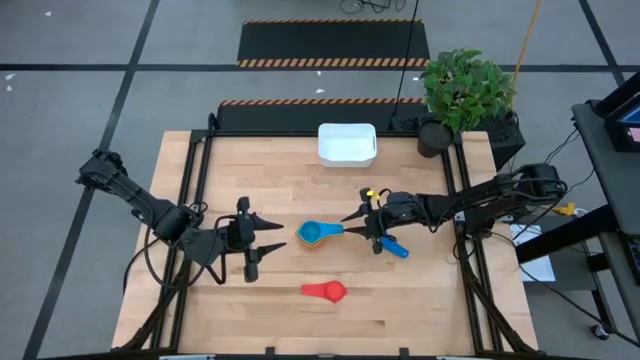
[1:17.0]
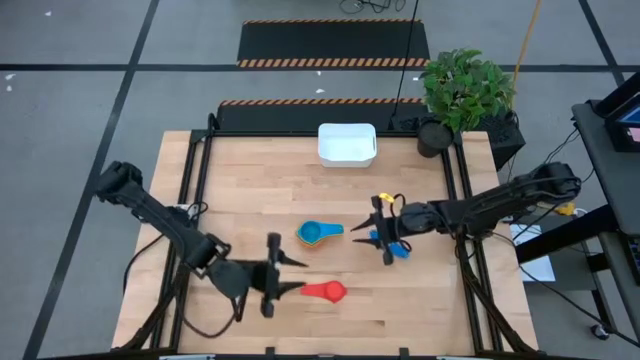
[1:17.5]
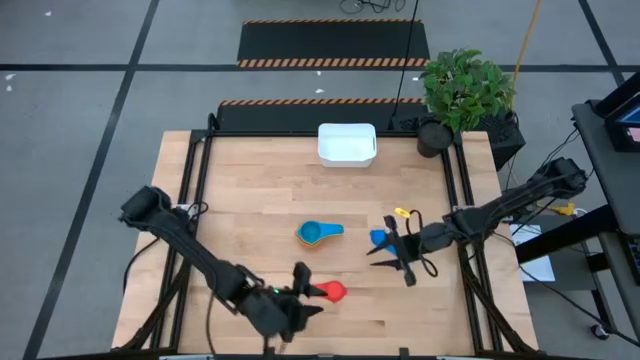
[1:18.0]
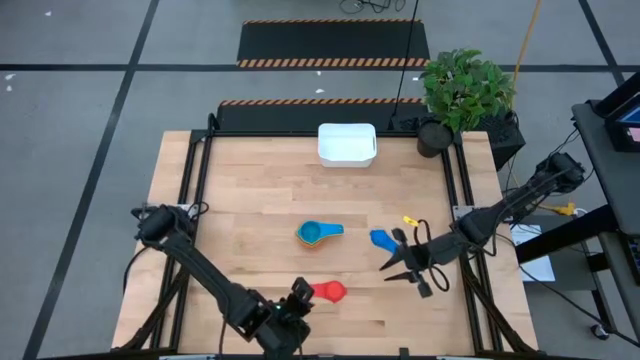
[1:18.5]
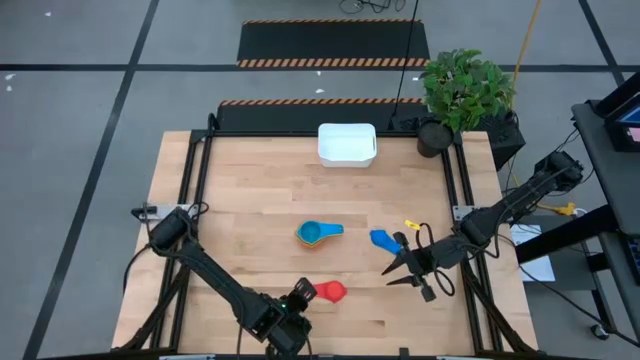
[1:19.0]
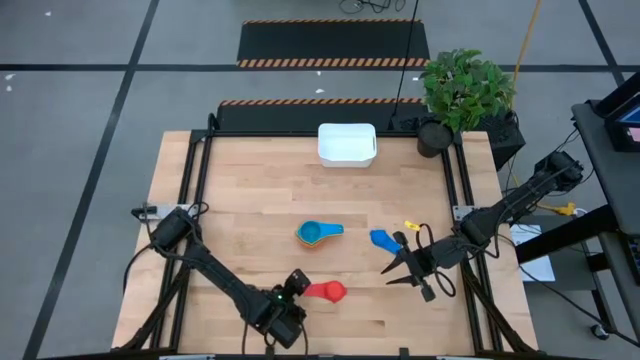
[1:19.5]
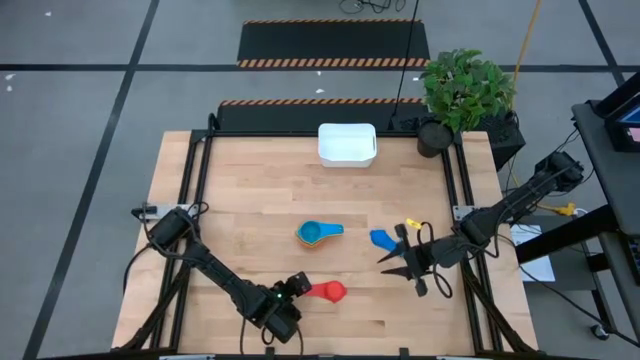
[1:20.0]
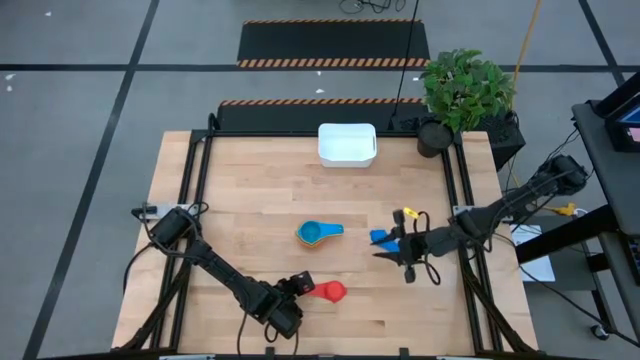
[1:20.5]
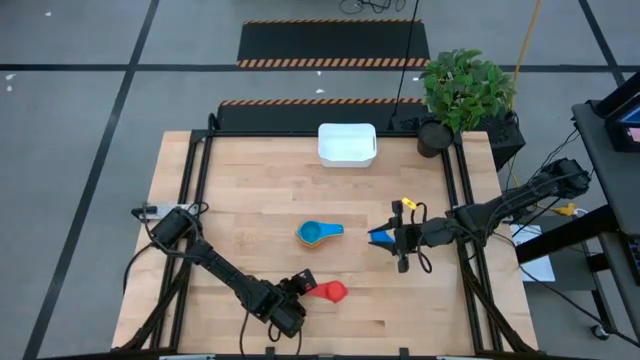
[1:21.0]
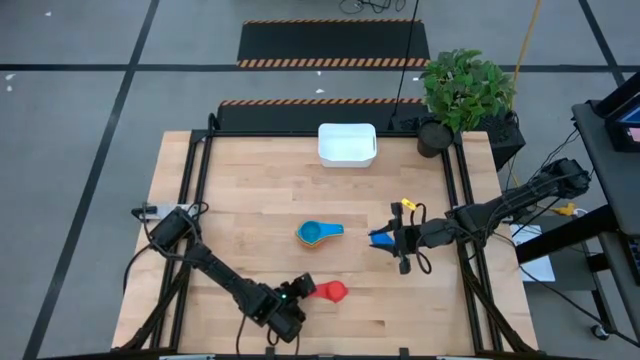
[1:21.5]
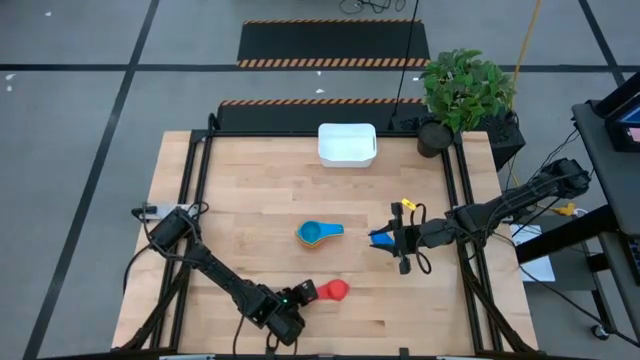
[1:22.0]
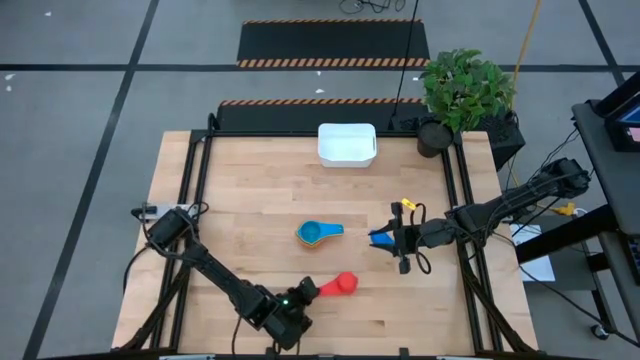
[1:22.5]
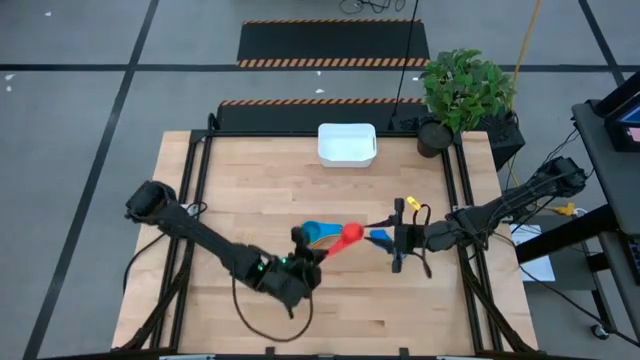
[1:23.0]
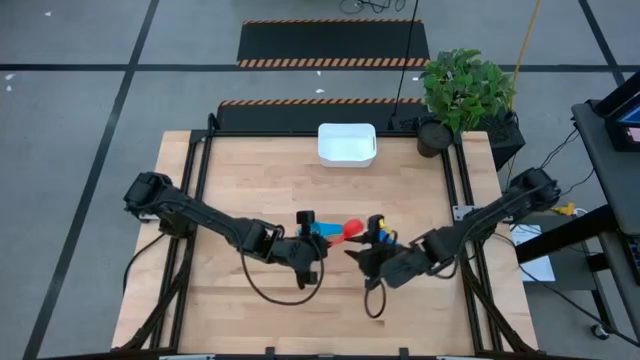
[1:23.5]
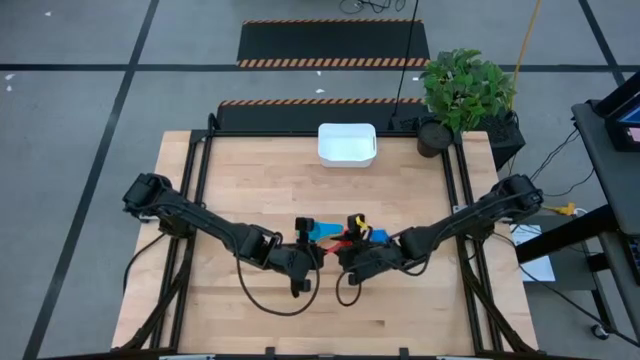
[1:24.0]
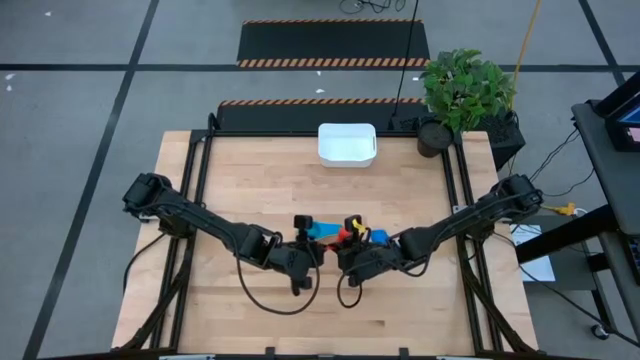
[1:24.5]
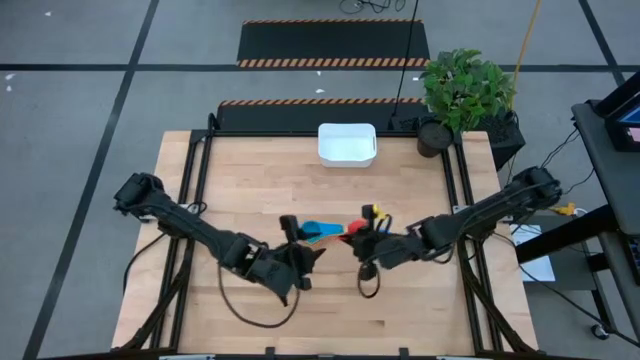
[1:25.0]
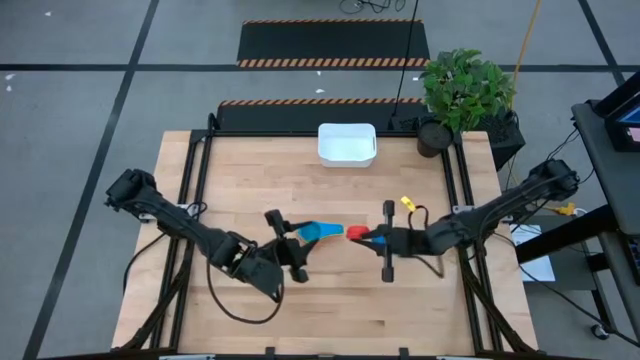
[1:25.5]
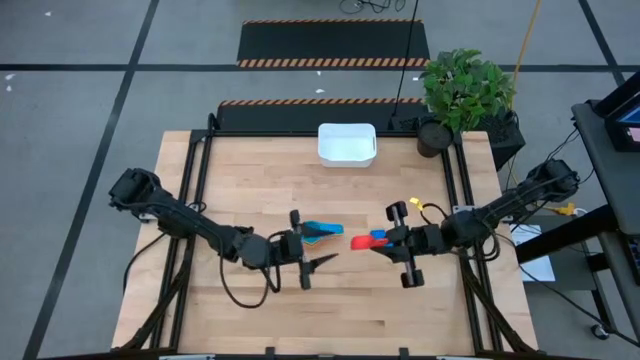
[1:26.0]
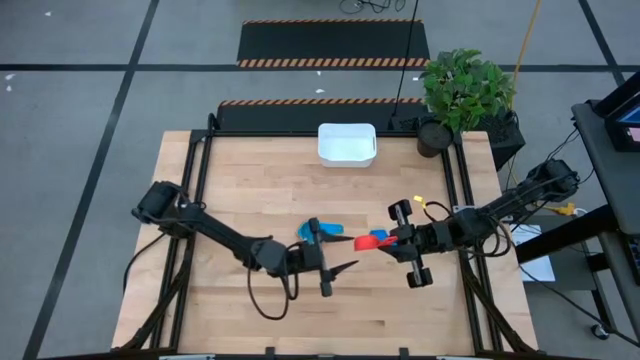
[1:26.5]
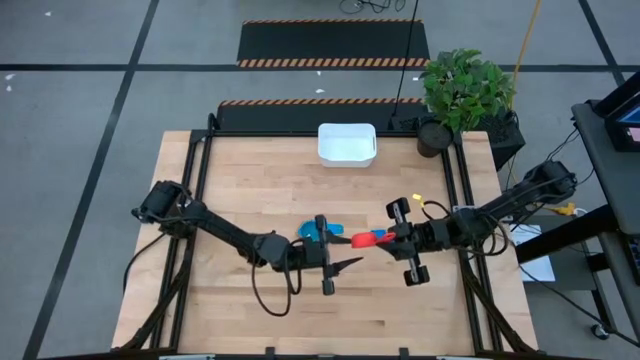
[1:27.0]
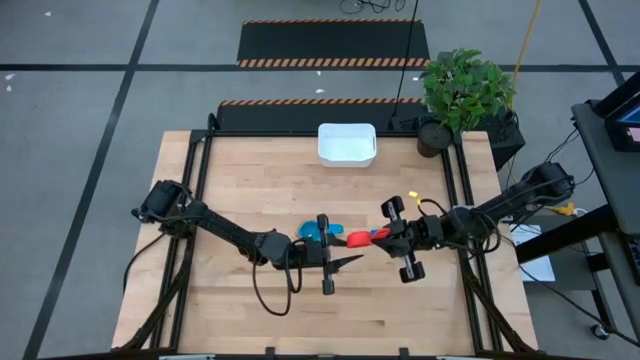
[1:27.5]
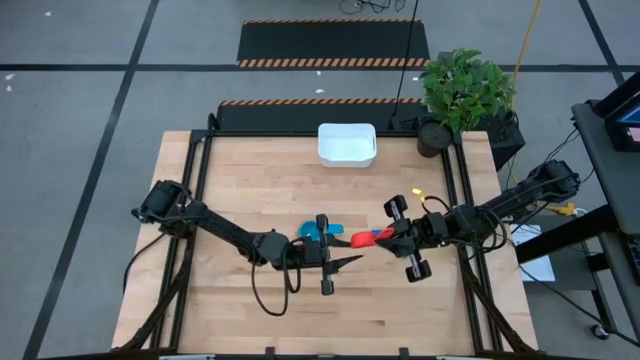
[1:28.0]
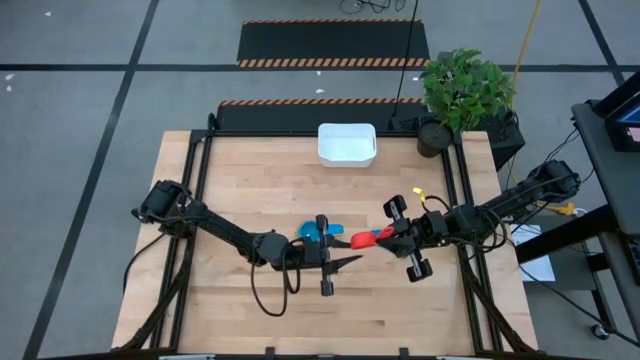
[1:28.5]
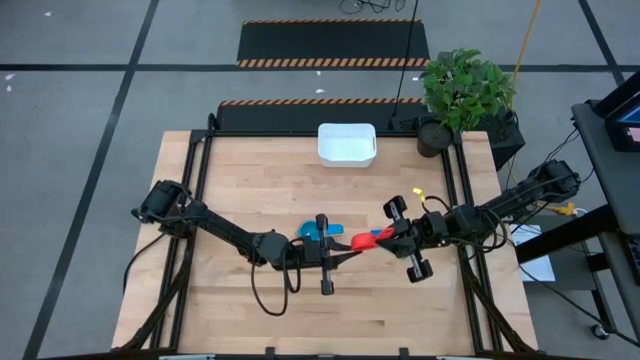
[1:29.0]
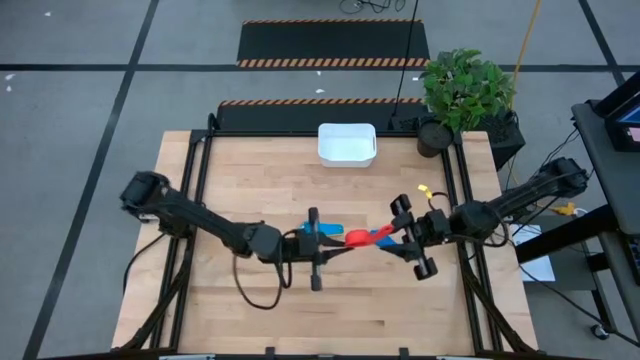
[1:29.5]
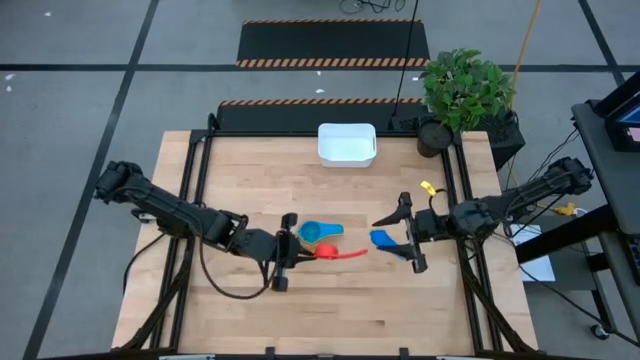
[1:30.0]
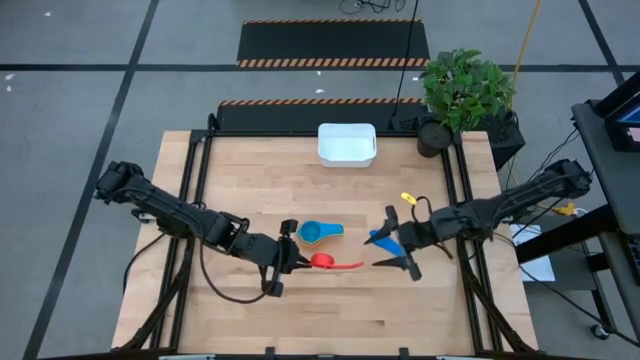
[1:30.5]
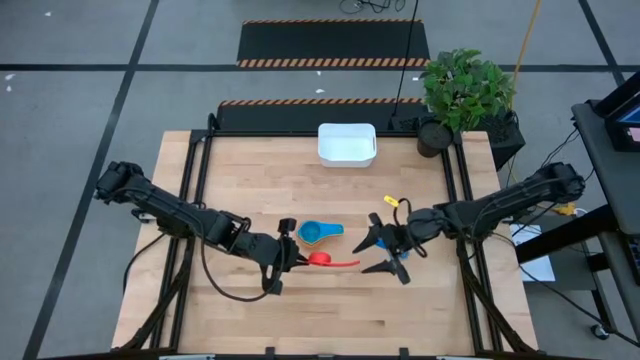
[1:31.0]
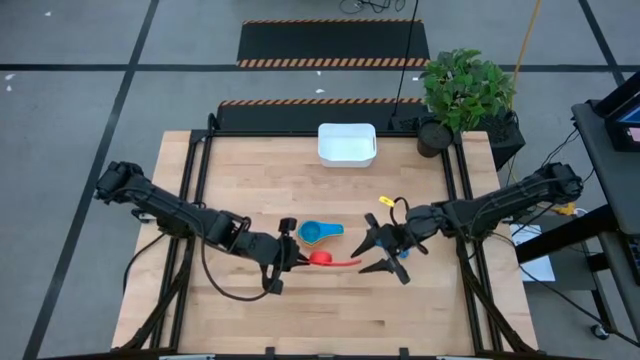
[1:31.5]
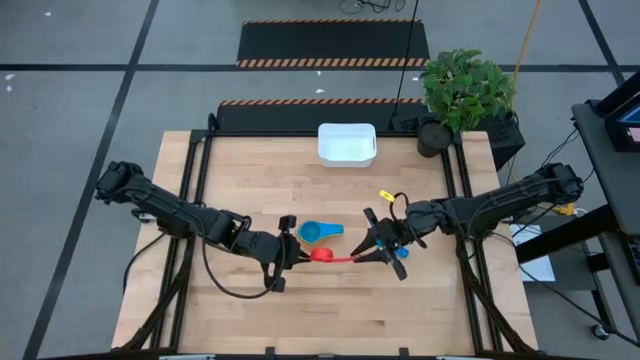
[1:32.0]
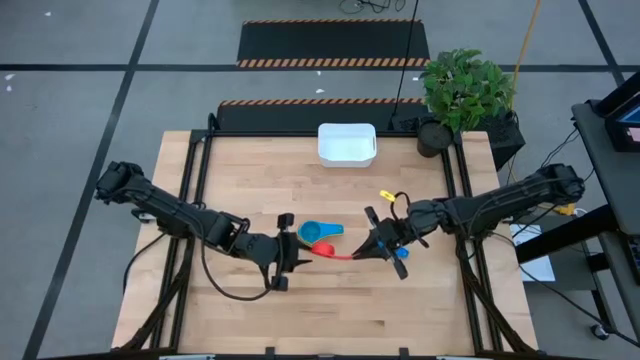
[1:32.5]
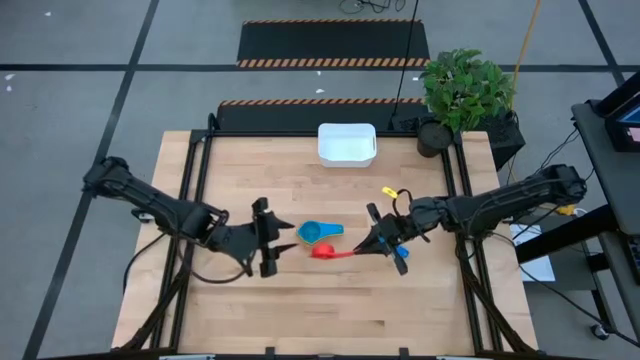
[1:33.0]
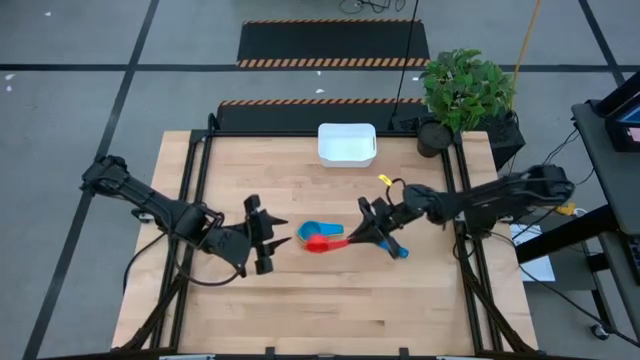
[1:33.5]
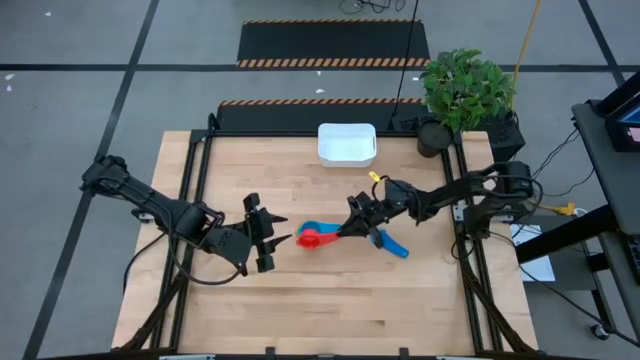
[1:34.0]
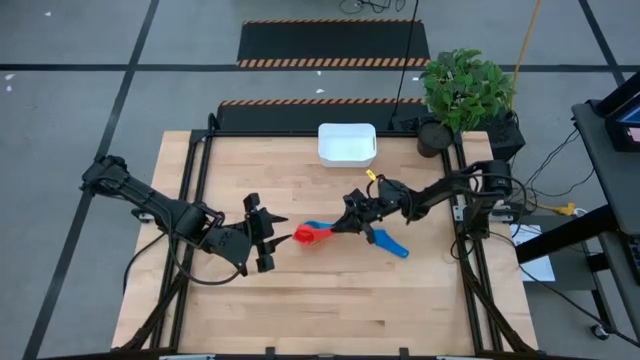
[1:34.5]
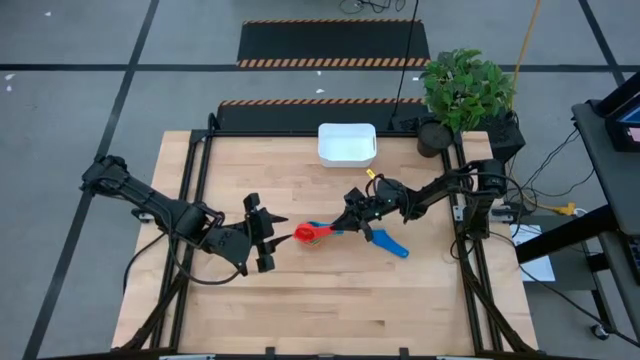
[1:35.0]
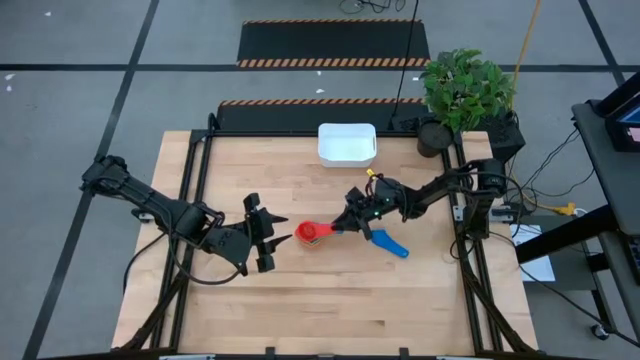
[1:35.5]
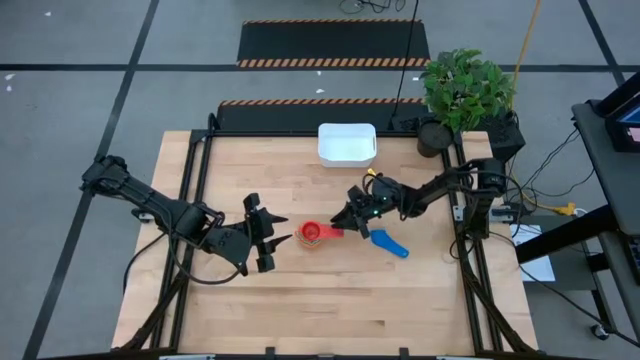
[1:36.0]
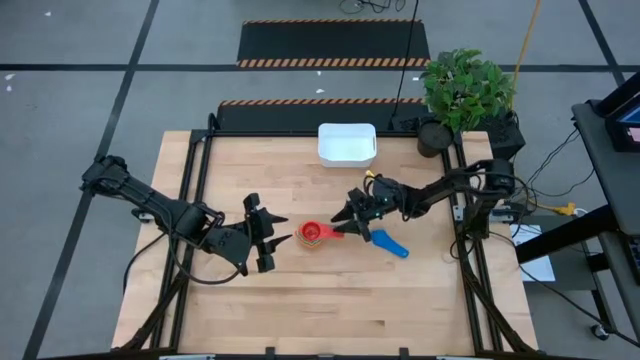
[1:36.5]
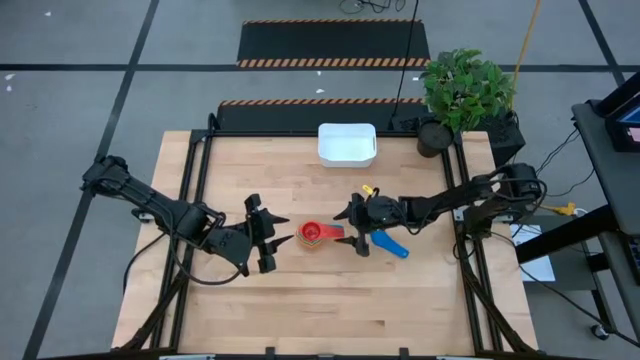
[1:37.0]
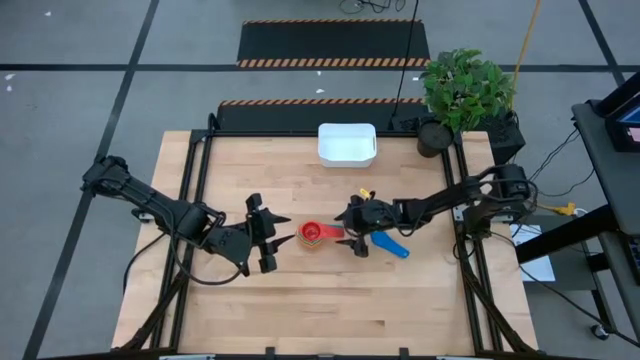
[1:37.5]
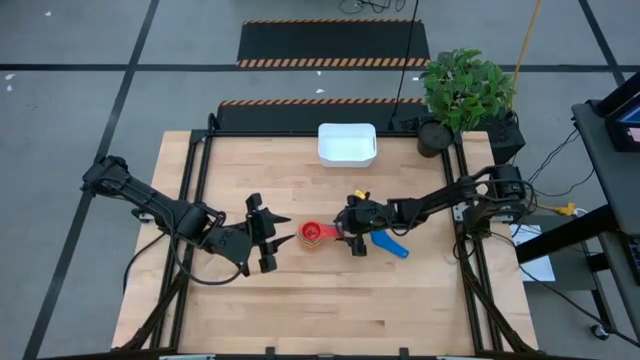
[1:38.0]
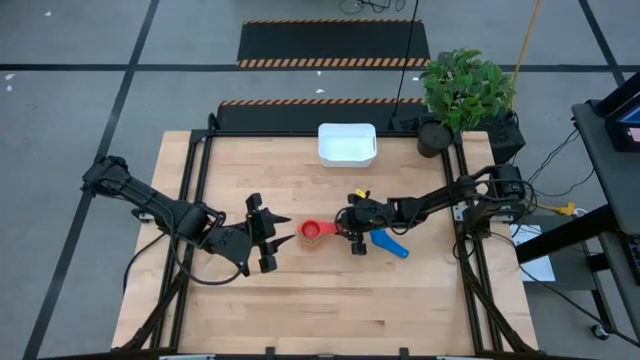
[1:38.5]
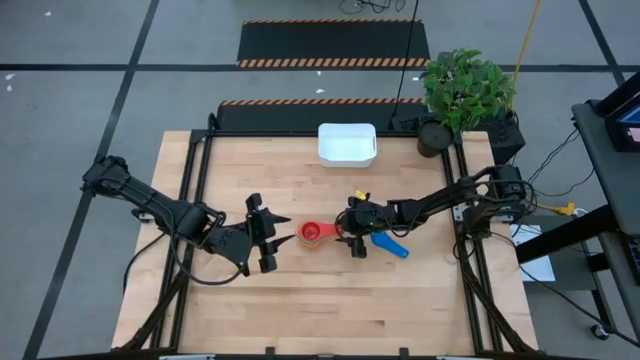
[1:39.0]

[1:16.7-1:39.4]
Task: Nest measuring cups in basket
Stack the red measuring cup into the light blue measuring cup
